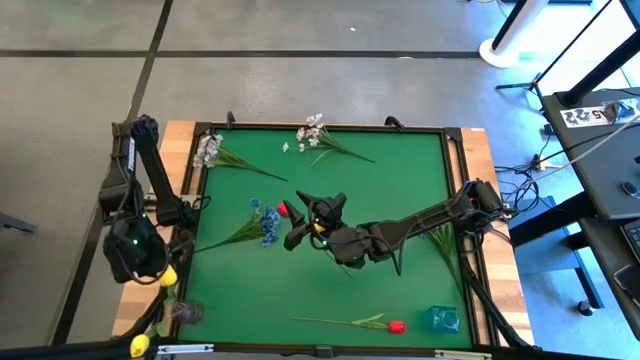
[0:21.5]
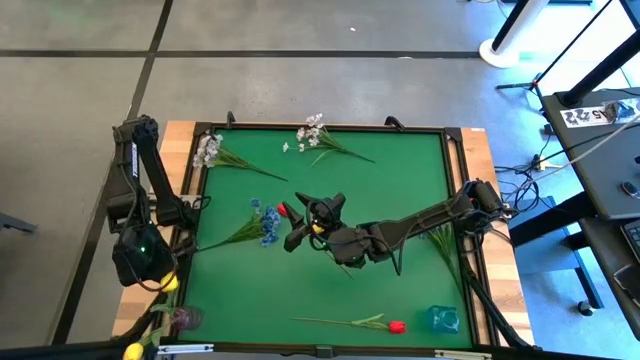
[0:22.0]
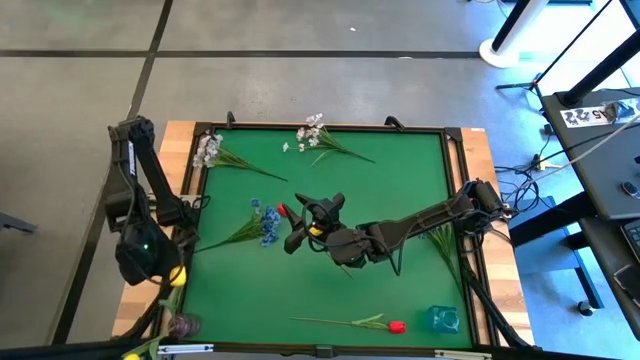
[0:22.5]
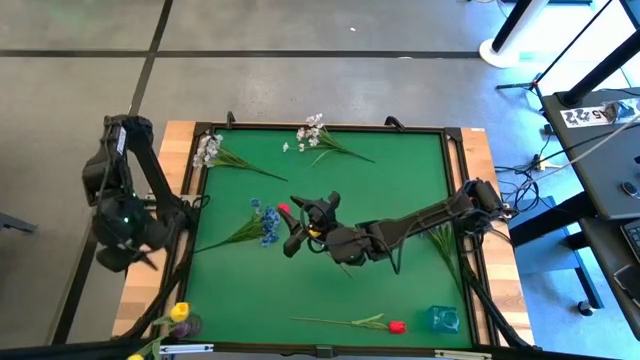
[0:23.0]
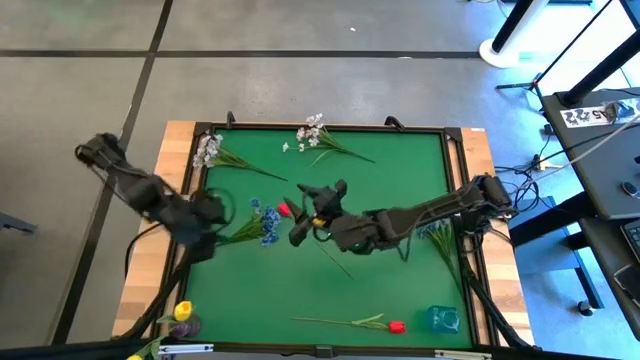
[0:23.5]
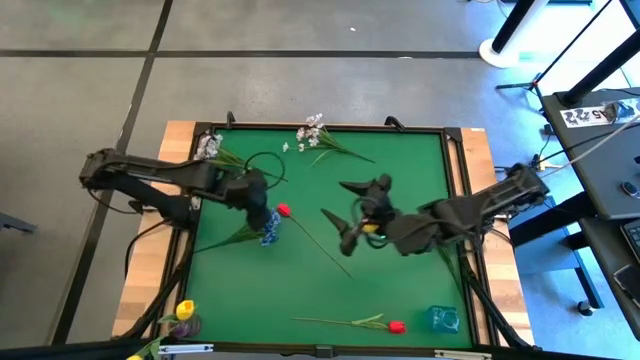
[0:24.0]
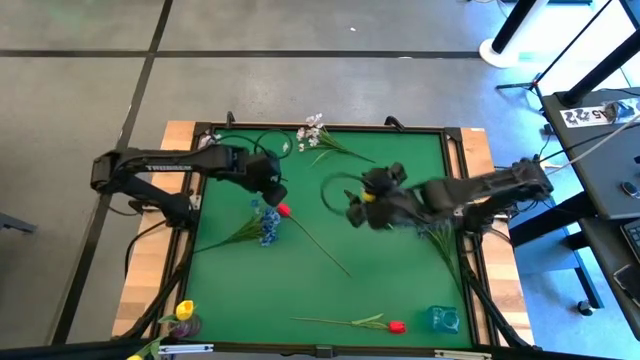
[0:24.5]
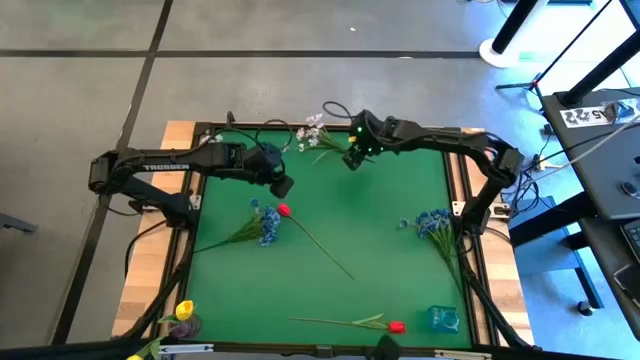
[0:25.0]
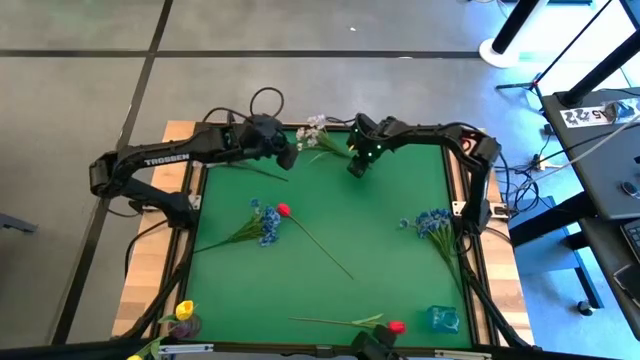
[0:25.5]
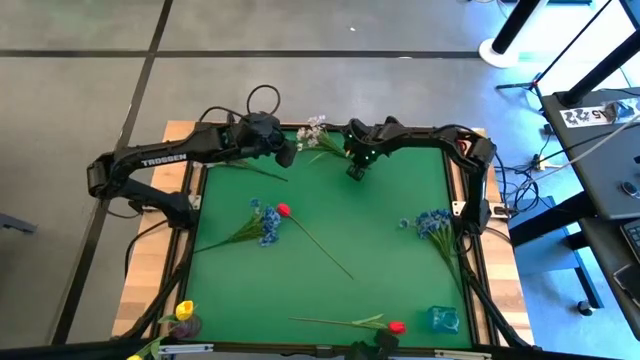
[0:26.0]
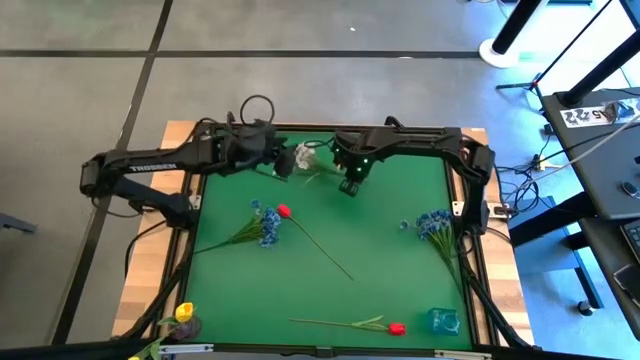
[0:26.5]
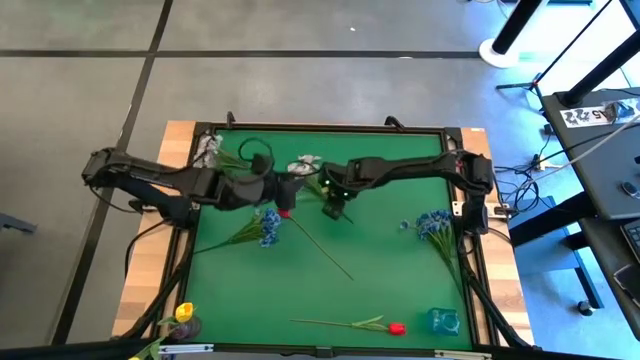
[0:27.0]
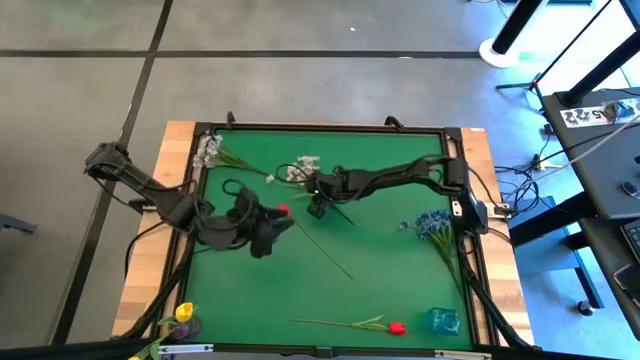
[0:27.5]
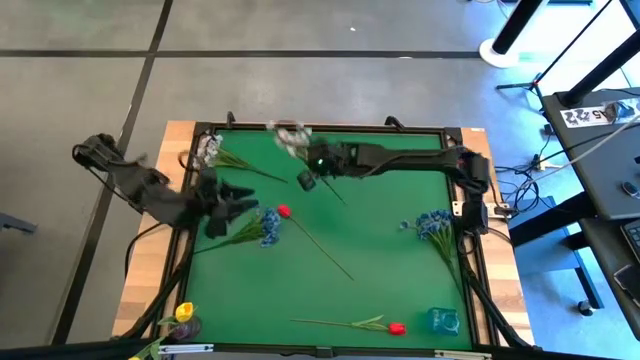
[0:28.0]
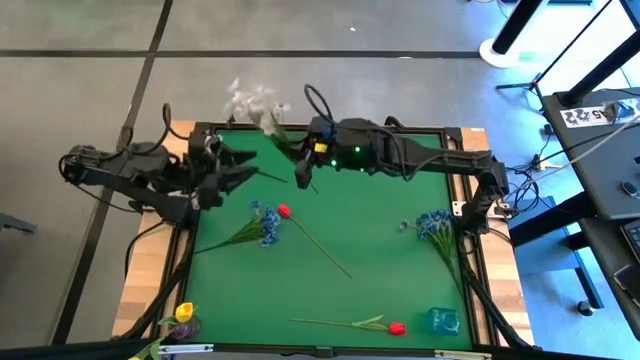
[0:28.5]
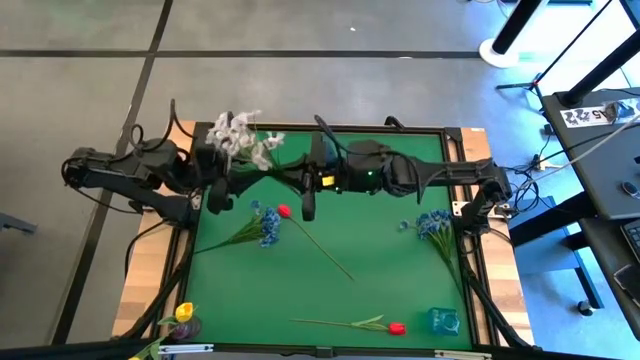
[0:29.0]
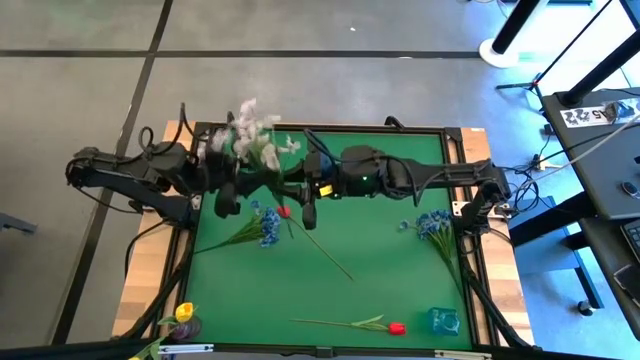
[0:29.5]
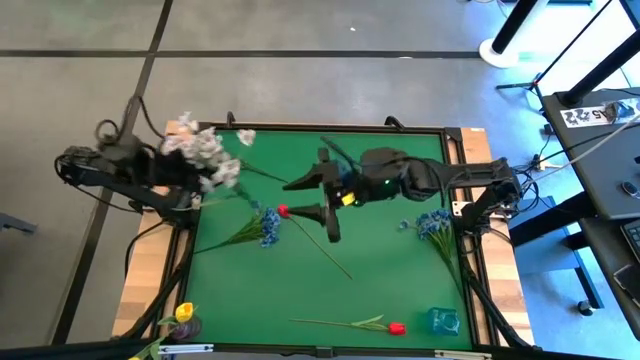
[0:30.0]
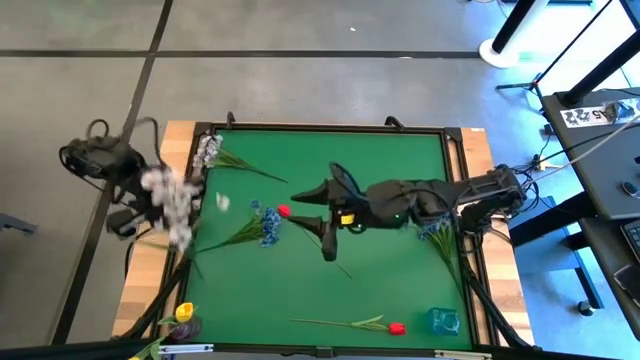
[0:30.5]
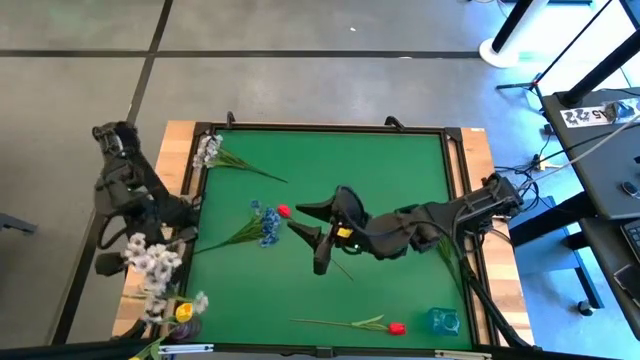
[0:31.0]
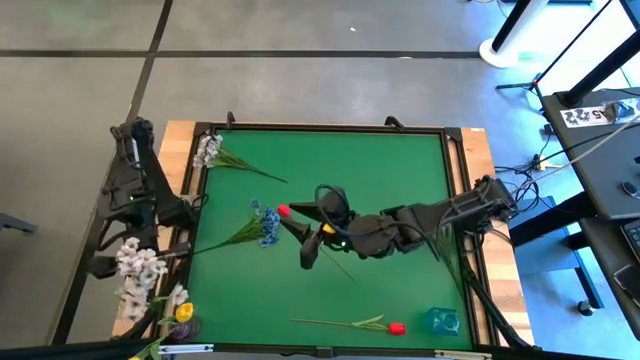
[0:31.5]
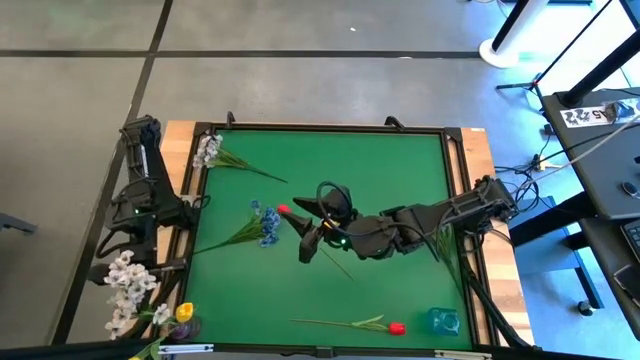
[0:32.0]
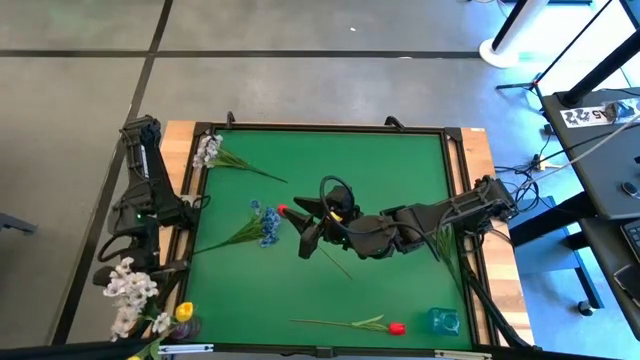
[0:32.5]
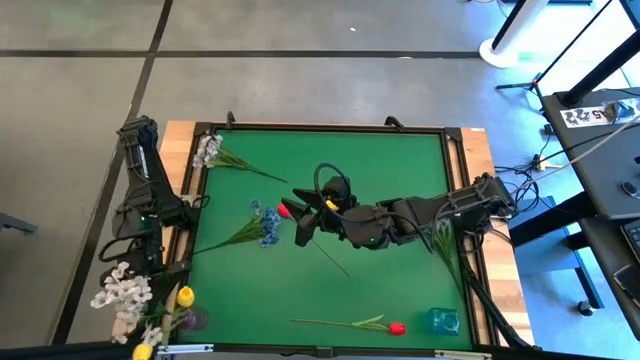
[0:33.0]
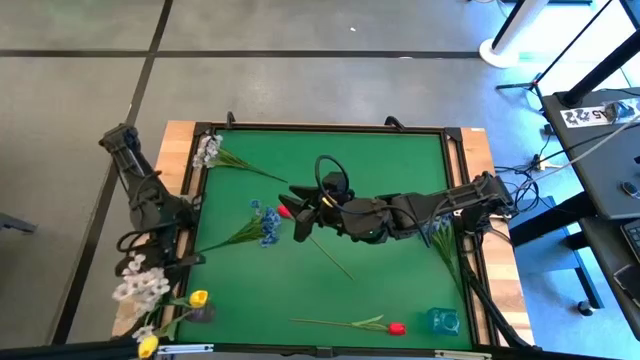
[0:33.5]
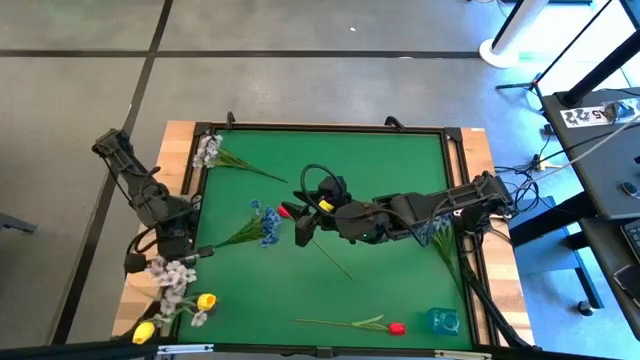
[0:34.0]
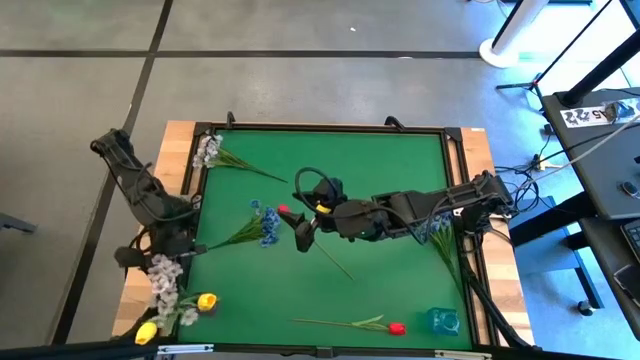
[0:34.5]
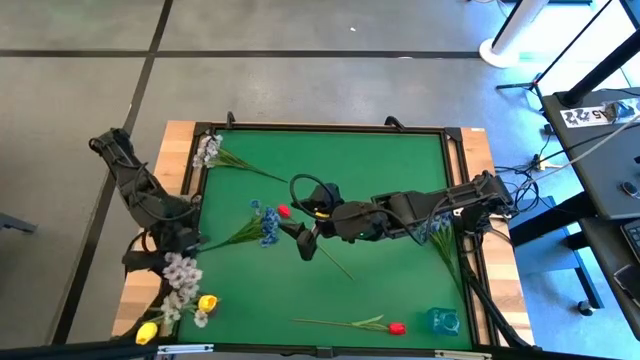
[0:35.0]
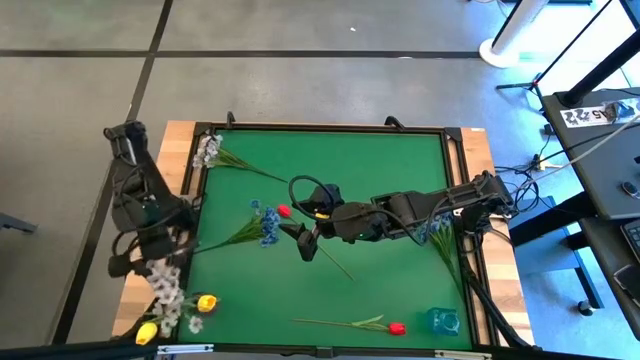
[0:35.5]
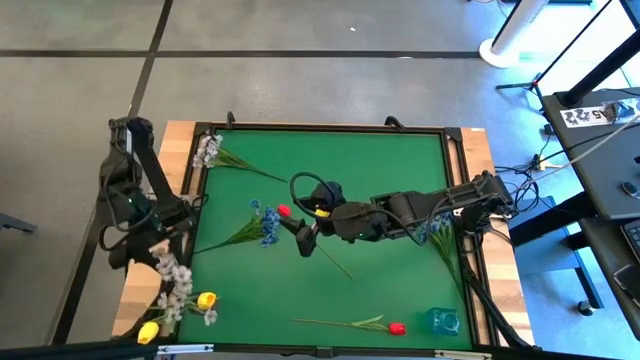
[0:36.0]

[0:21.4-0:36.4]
Task: Sort flowers into vase by color
Put the right white flowers into the purple vase
